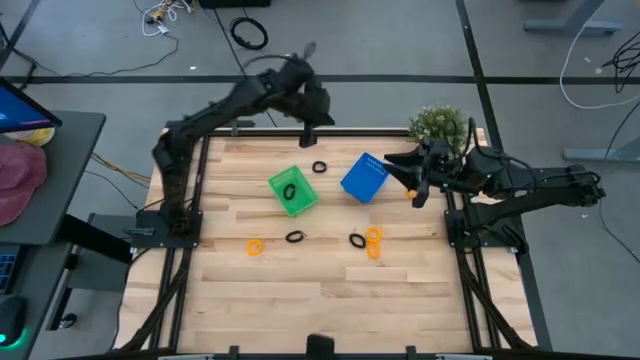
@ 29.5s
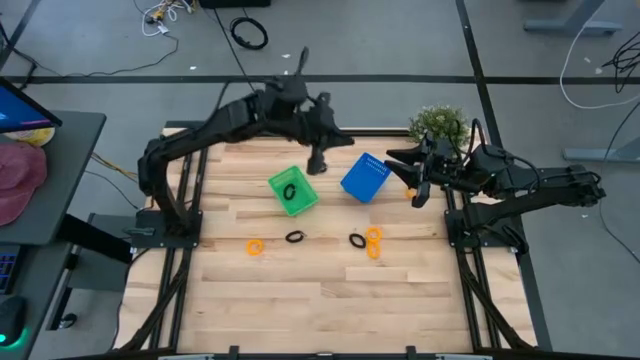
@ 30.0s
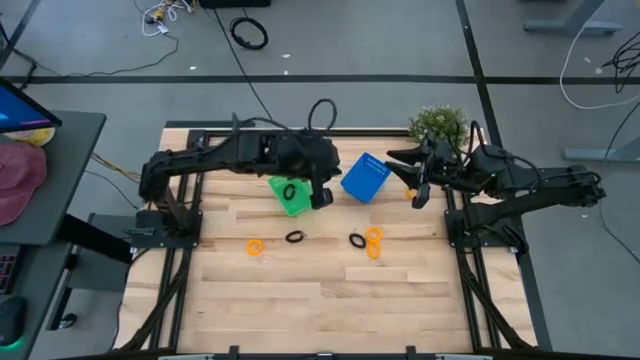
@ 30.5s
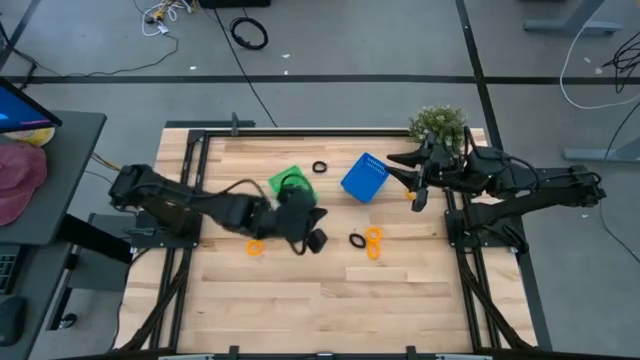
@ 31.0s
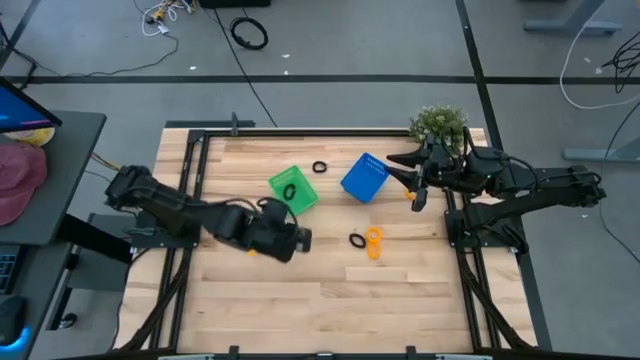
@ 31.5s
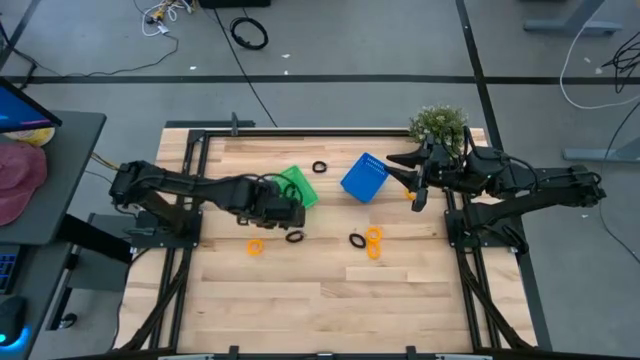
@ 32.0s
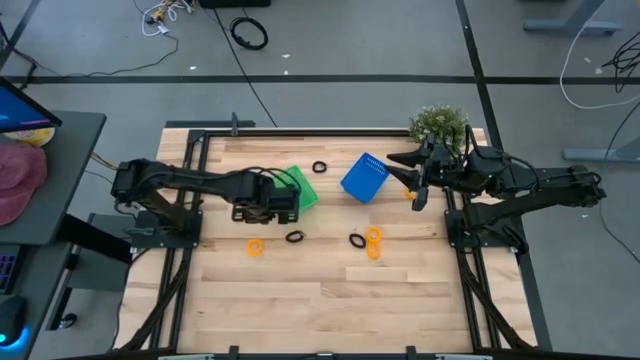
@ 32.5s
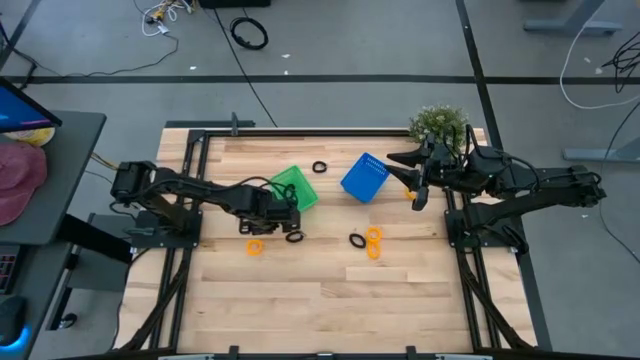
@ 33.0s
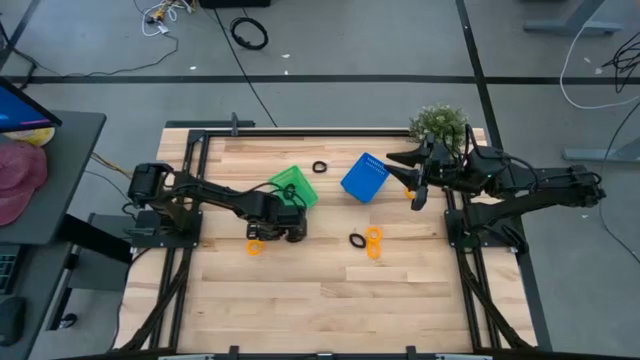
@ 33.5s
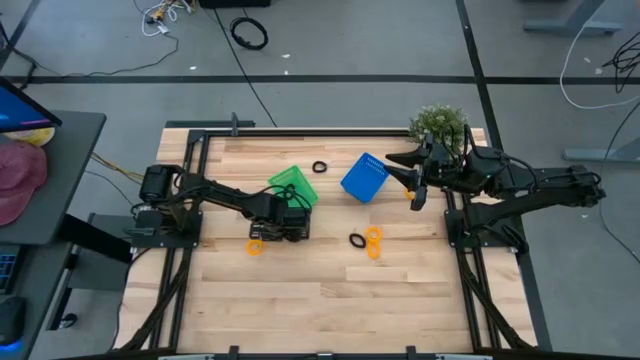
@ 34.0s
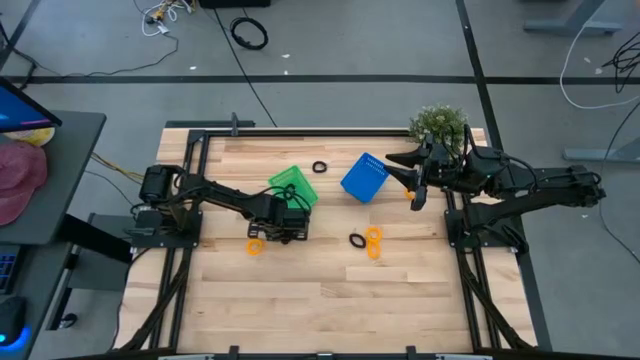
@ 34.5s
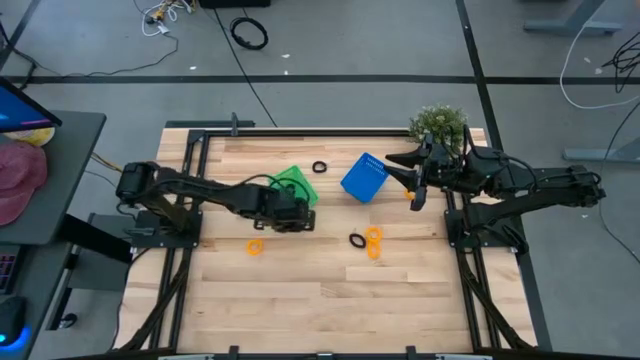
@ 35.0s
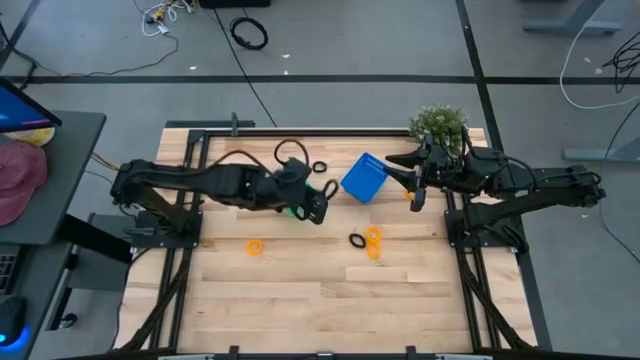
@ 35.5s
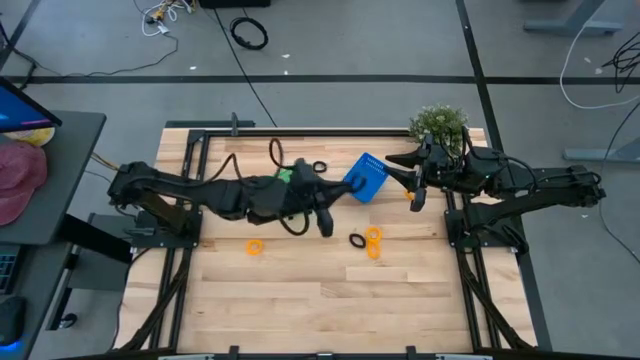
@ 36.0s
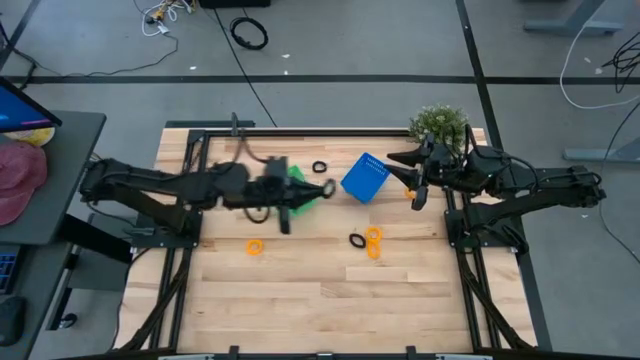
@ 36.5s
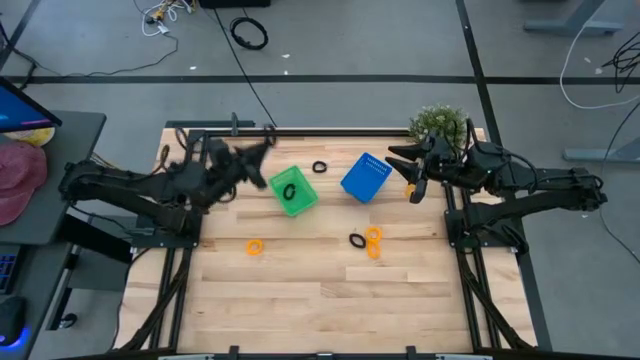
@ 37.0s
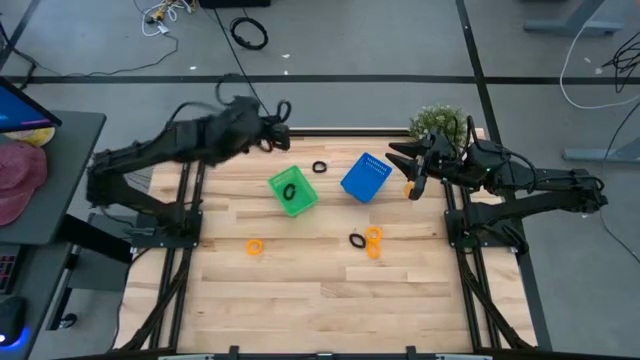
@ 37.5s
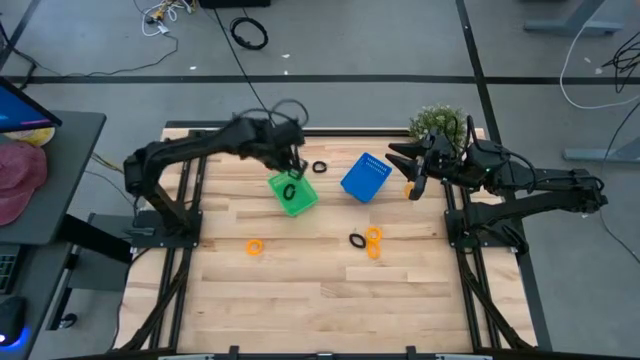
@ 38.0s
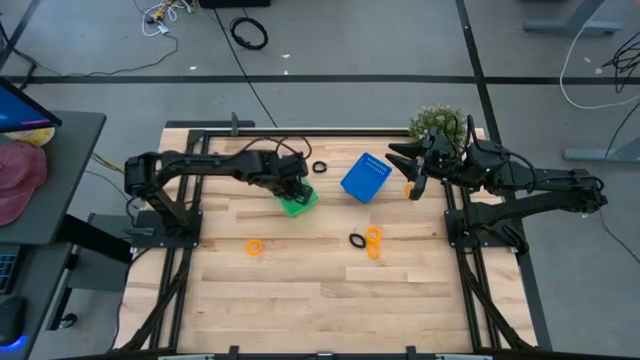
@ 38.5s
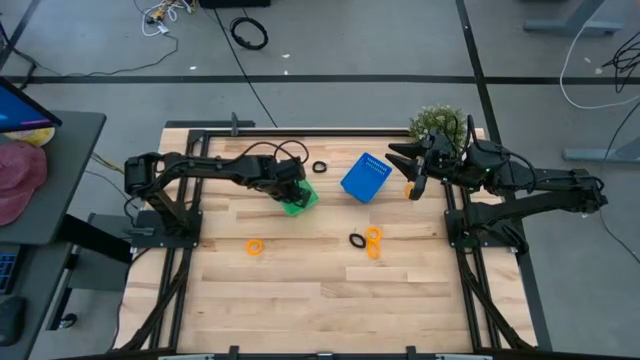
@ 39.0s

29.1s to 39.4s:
Task: Sort spring keychains
Put the black spring keychain into the green bin

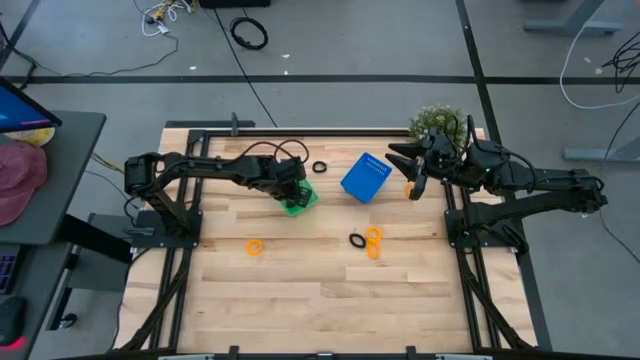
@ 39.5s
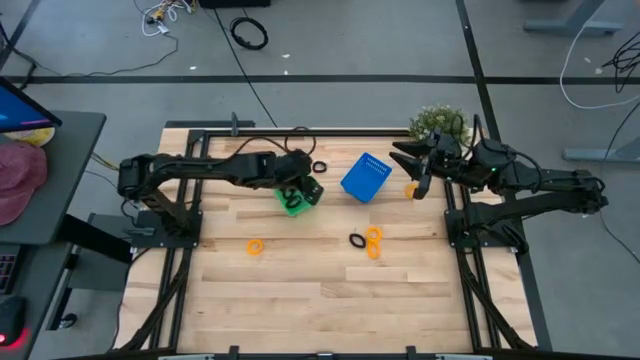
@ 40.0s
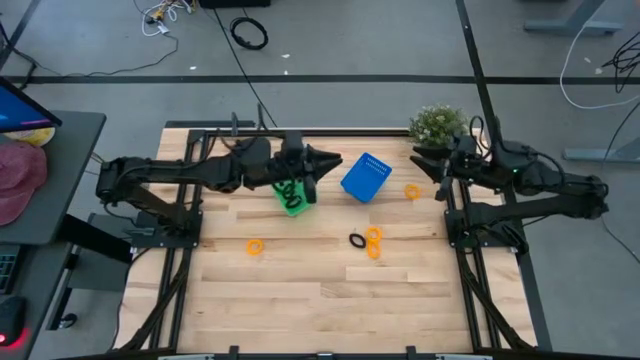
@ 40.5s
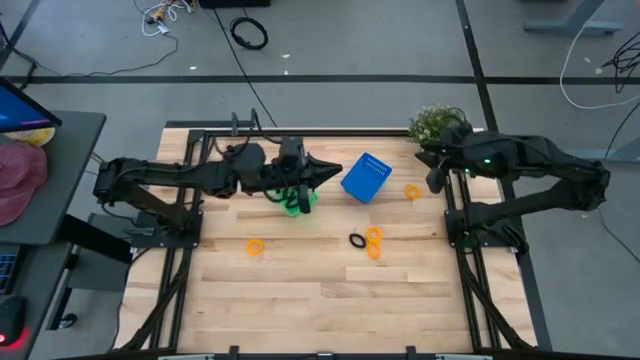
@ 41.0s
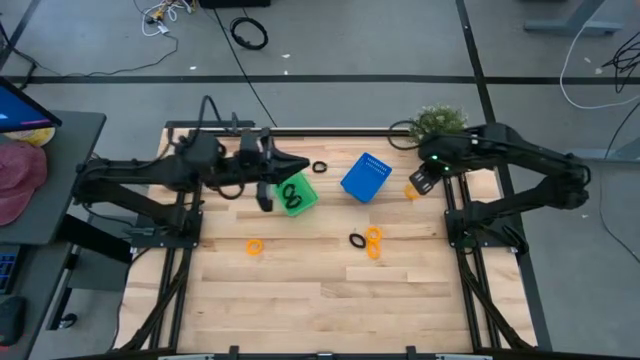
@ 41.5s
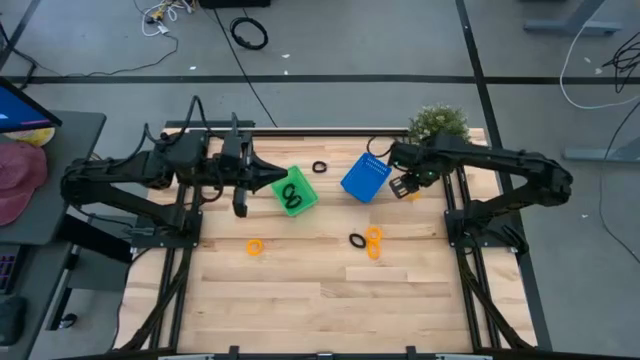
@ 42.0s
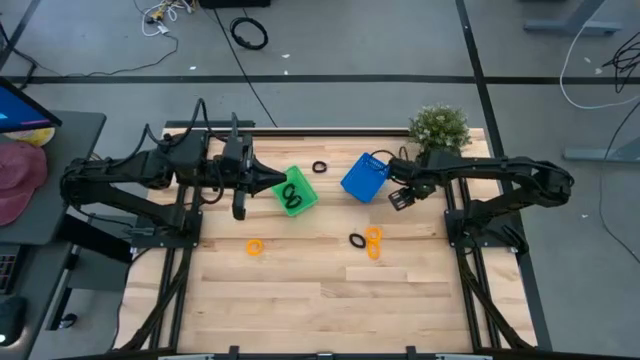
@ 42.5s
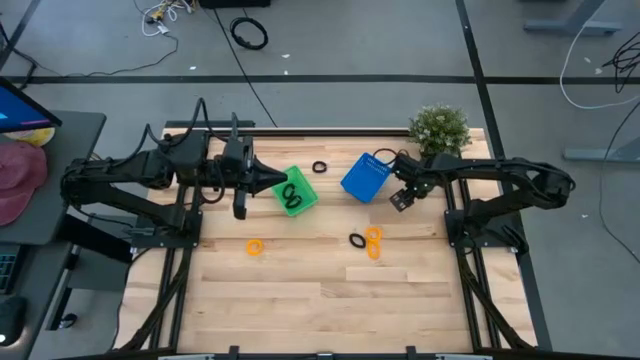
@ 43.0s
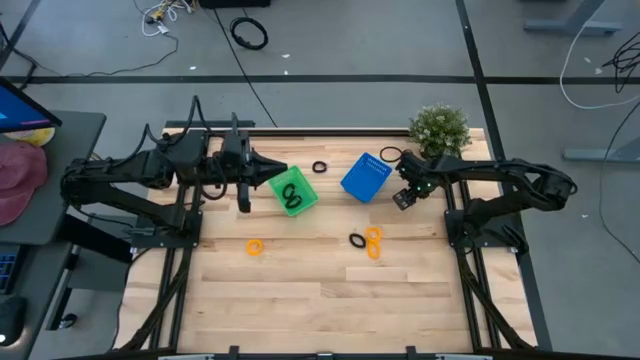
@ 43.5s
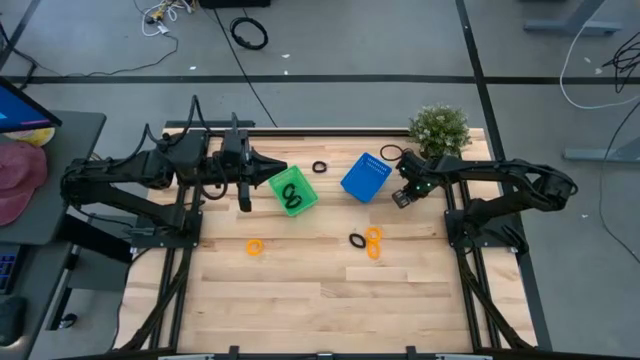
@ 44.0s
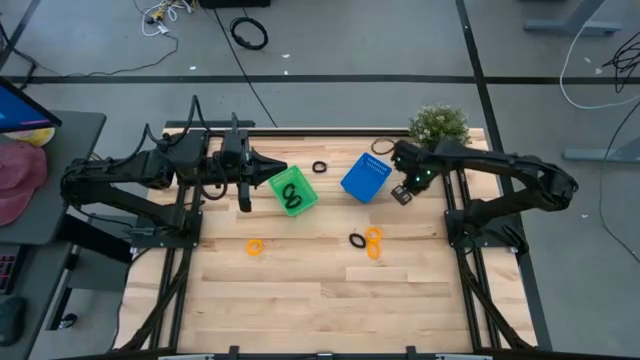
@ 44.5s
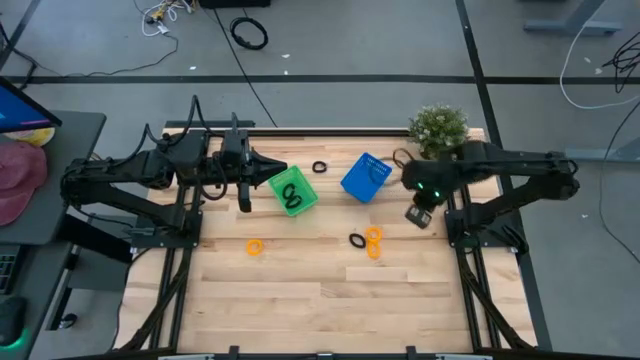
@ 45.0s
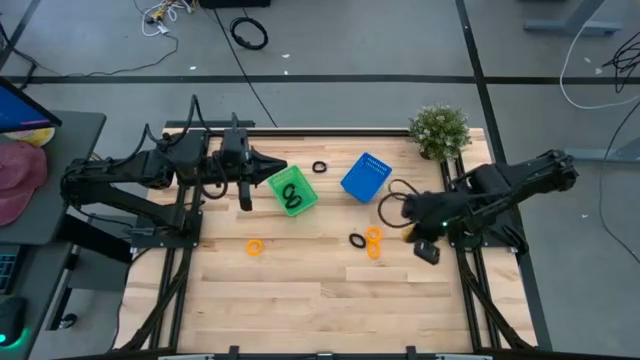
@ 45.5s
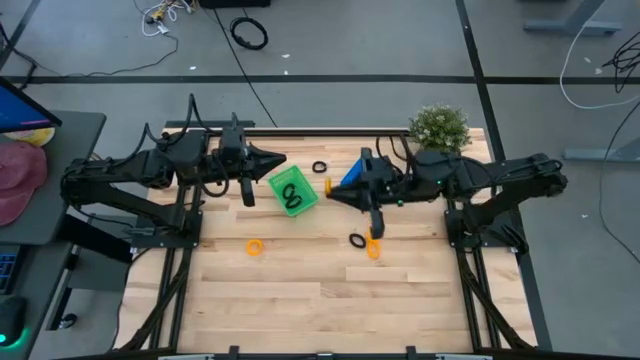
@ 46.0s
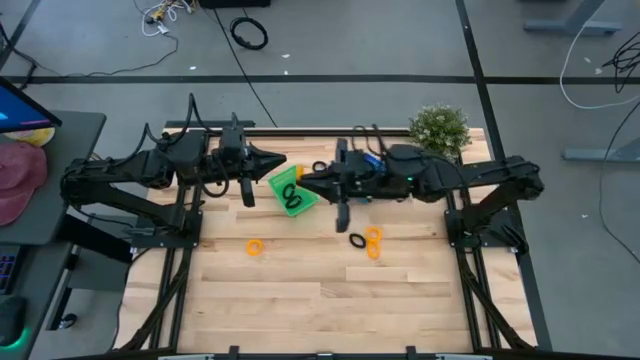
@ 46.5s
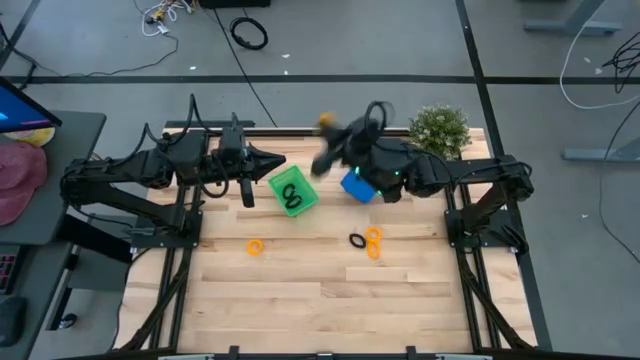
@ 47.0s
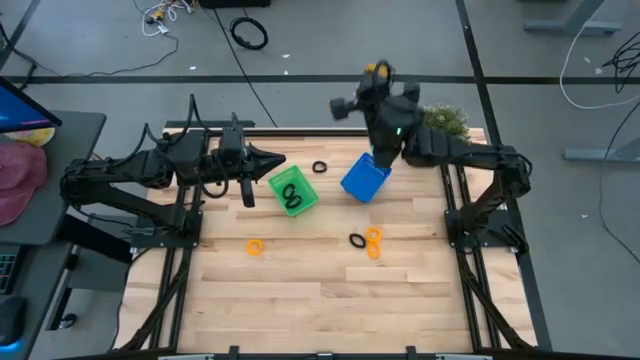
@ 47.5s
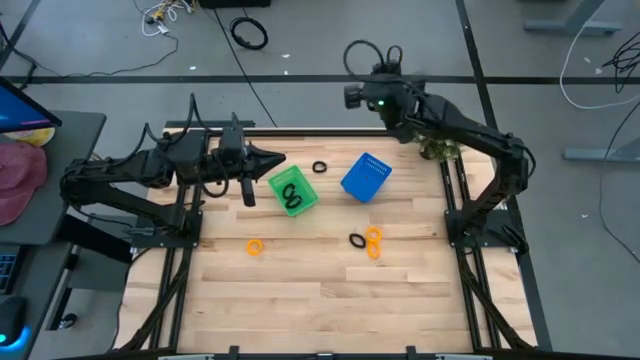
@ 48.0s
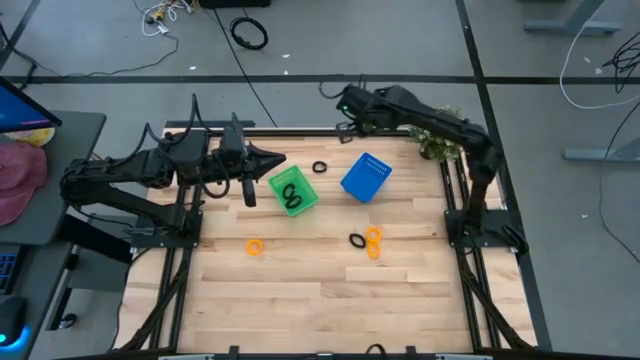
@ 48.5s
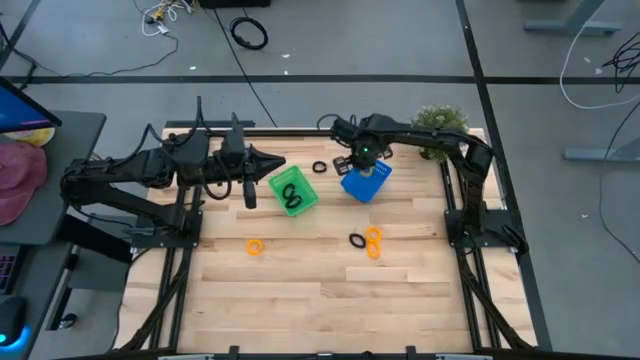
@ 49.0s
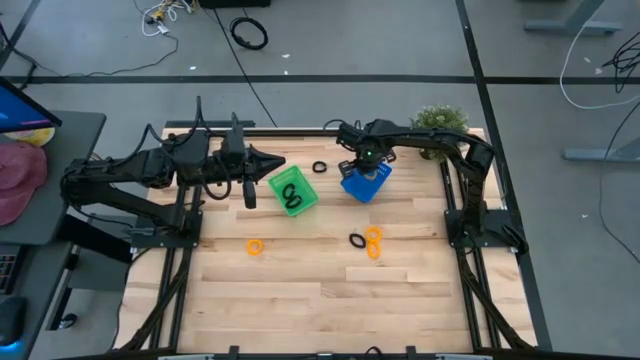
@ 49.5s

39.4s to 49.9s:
Put the yellow spring keychain into the blue bin
